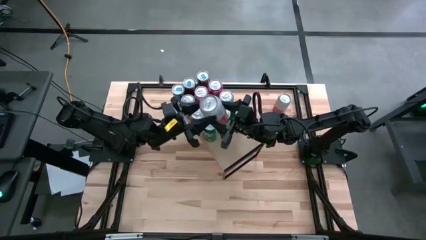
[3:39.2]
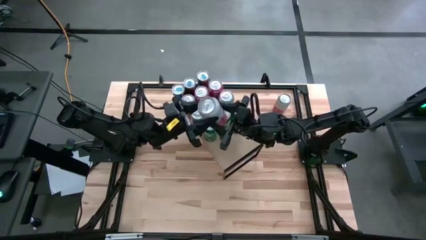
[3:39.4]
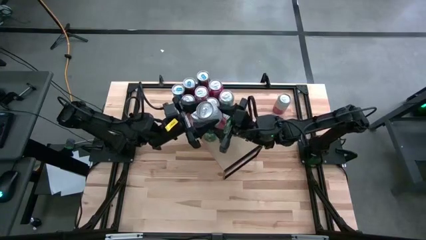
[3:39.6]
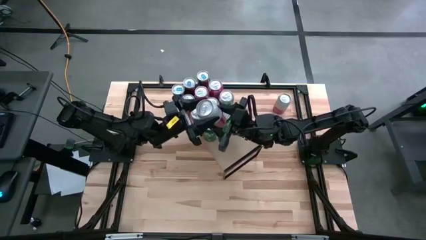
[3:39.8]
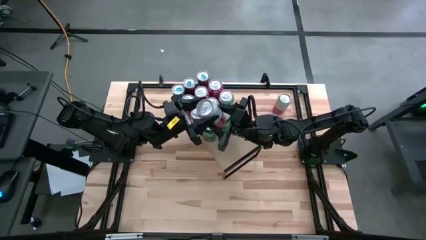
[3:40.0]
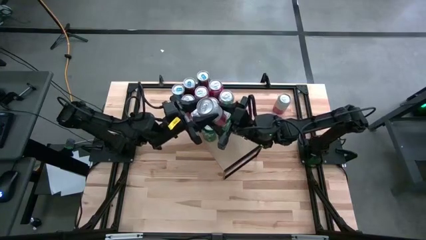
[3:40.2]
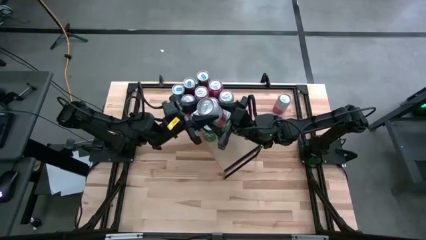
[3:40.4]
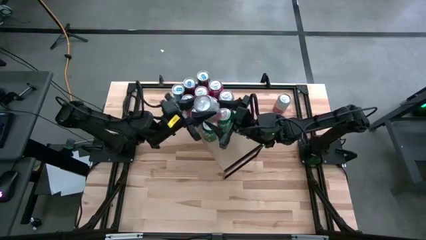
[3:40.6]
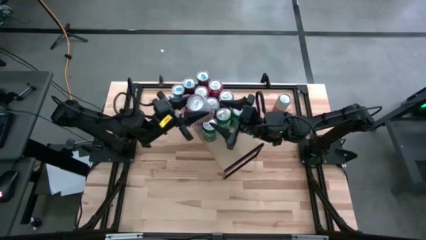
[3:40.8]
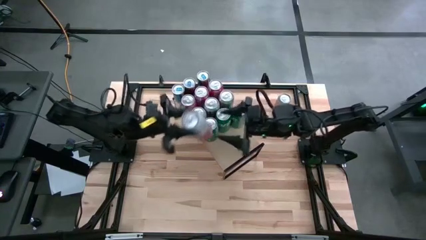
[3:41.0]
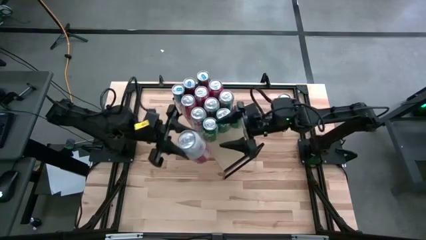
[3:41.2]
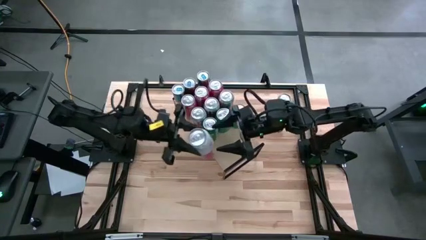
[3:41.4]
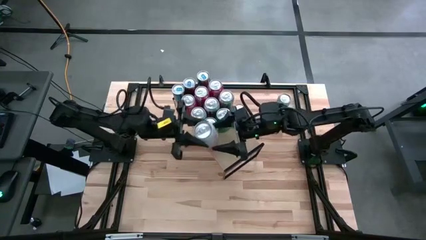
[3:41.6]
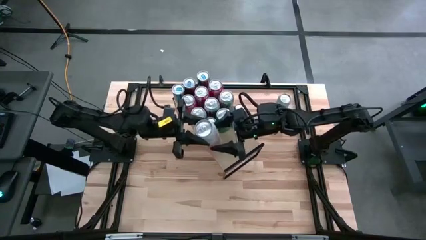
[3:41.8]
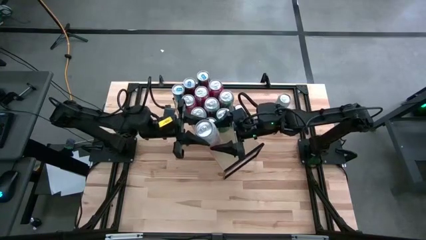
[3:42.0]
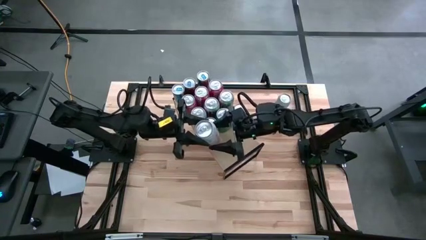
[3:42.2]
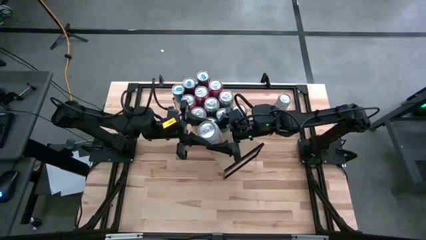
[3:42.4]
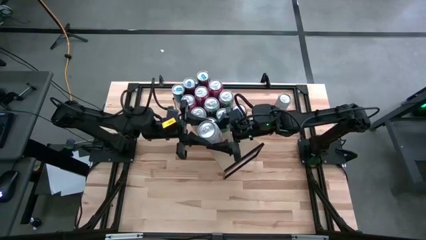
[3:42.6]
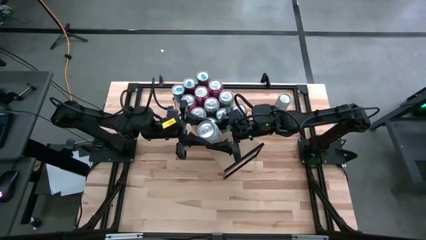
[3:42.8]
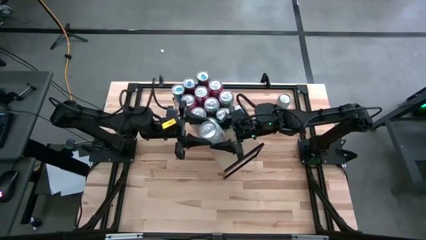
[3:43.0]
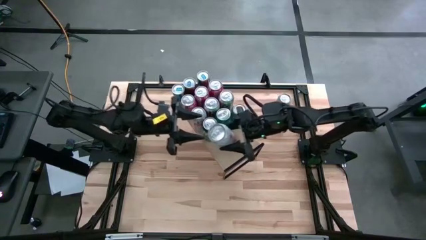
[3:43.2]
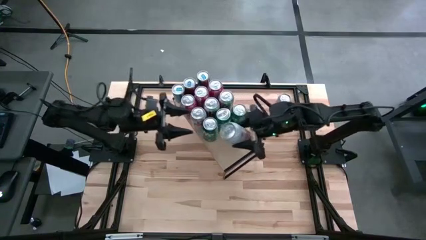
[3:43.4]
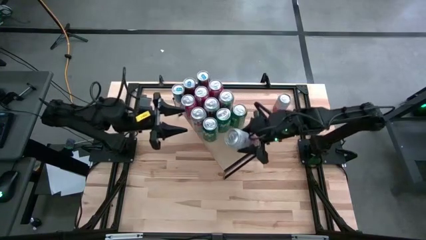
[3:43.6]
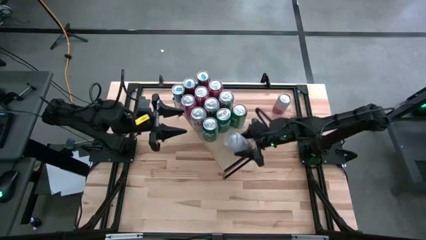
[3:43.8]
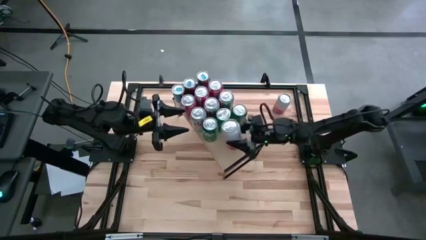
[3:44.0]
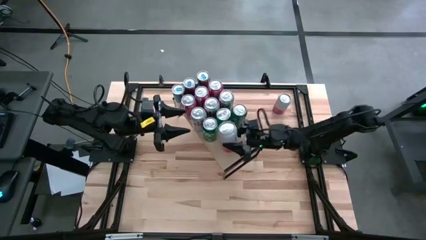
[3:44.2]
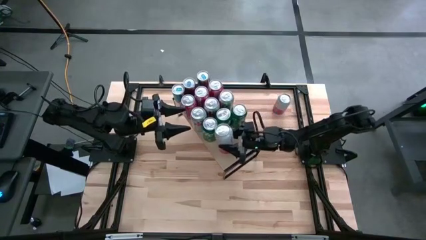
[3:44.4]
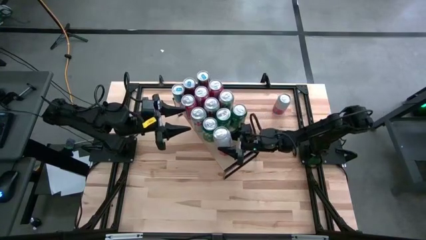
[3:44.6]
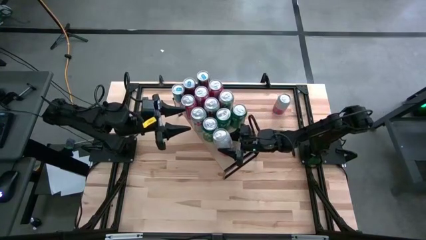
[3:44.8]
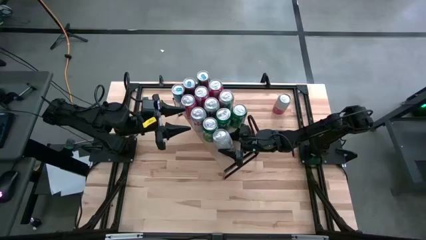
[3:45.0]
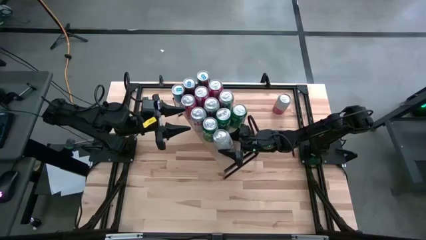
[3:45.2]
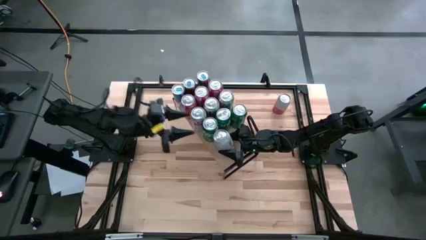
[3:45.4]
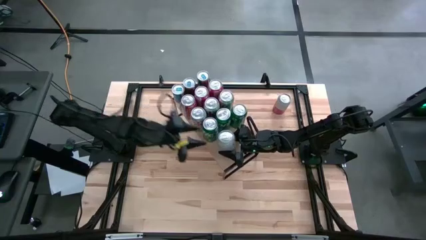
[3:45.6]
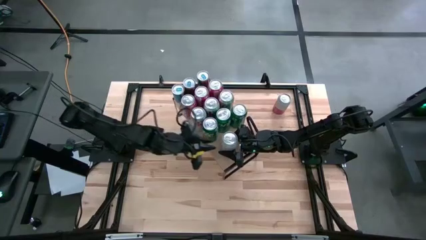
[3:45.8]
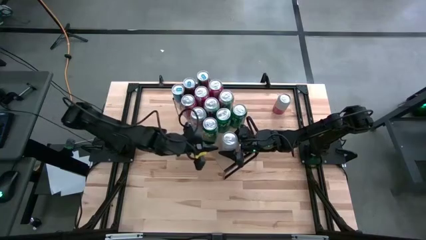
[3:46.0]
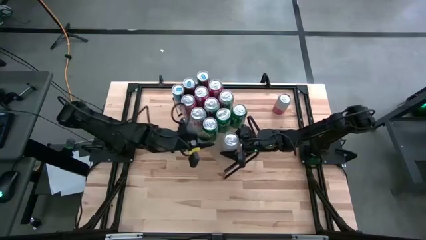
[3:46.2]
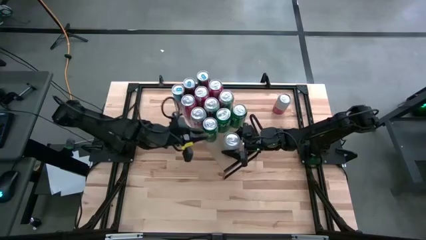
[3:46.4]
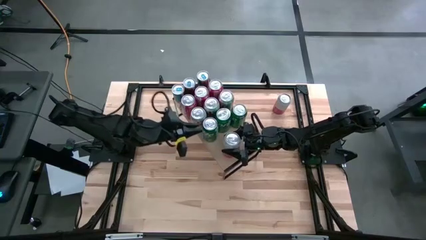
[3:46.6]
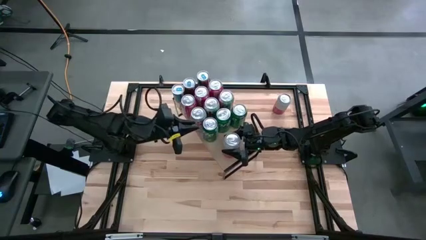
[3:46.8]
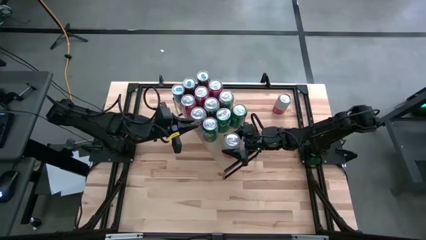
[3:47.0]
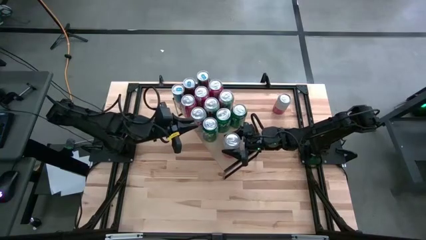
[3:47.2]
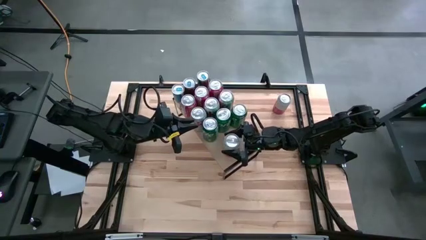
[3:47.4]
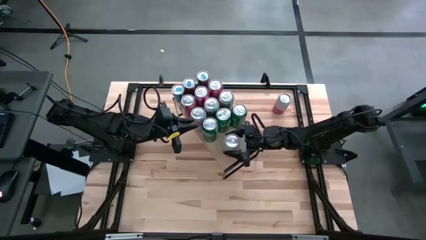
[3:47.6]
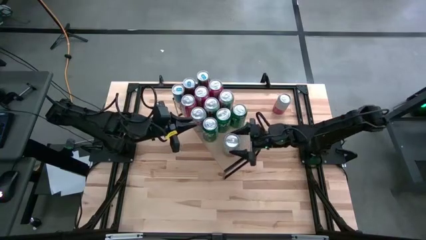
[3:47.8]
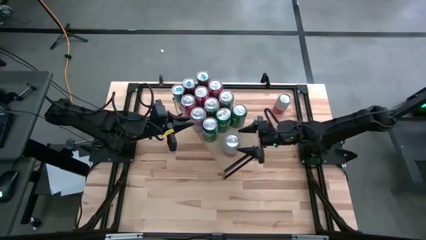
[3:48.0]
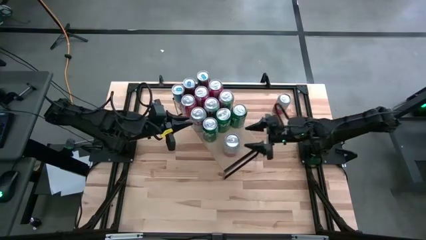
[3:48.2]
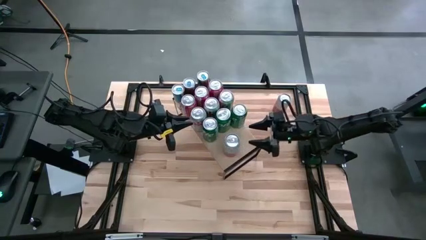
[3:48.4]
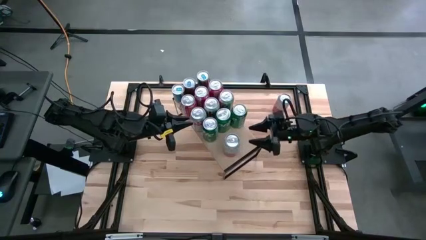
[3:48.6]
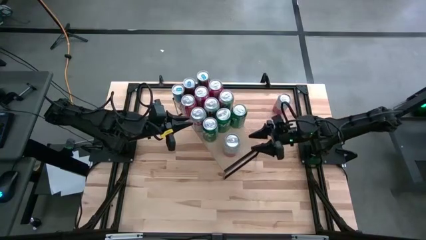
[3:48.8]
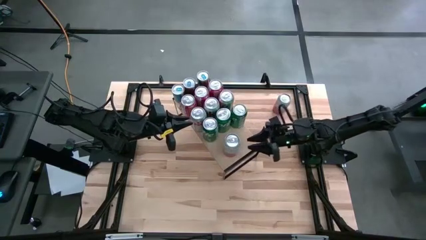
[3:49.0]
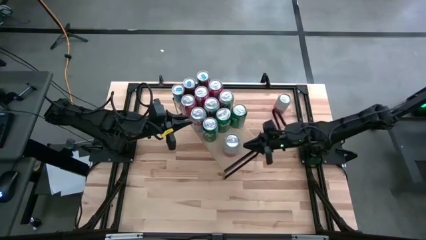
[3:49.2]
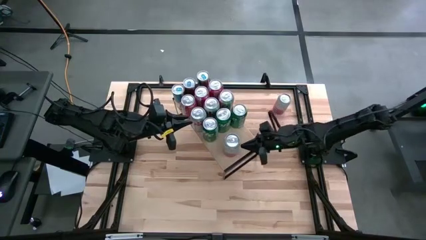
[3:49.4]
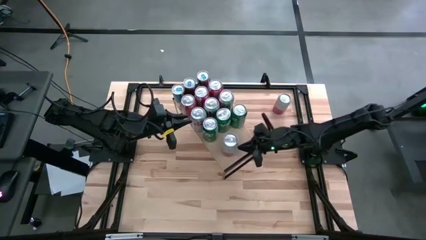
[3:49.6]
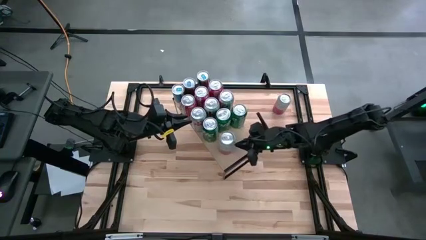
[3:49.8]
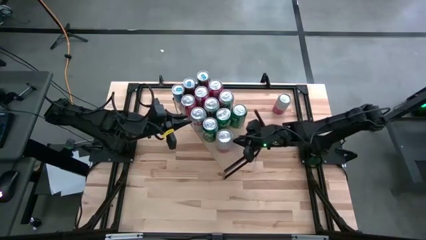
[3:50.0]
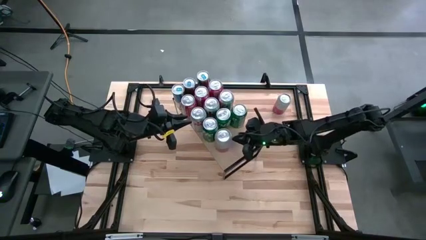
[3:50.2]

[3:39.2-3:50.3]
Task: Place canned beverage on shelf
Put the bottom pink soda can on the shelf

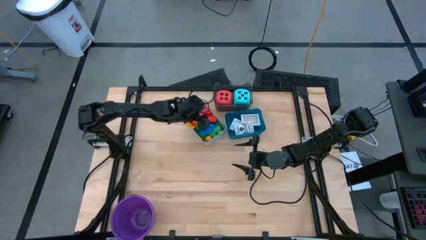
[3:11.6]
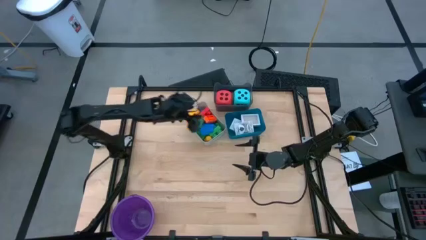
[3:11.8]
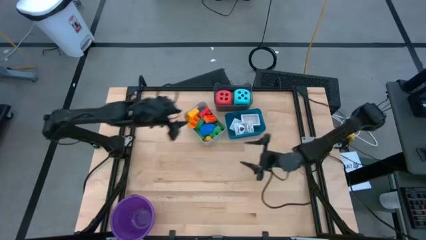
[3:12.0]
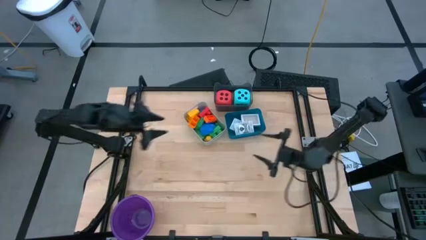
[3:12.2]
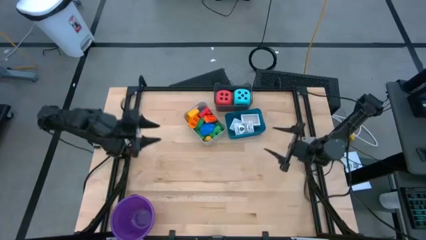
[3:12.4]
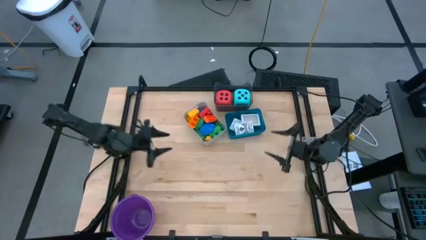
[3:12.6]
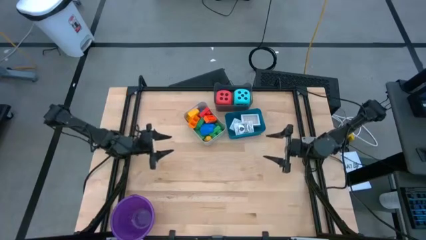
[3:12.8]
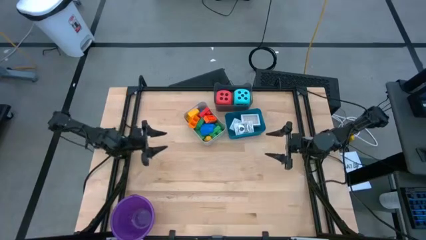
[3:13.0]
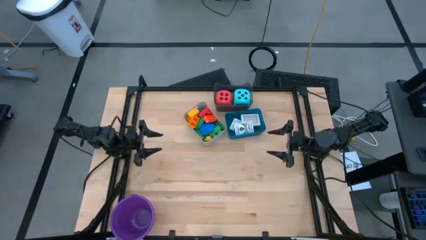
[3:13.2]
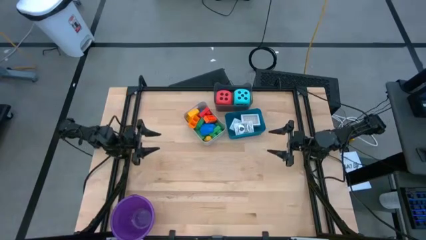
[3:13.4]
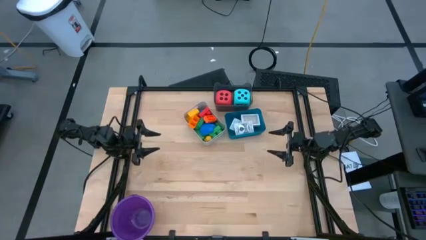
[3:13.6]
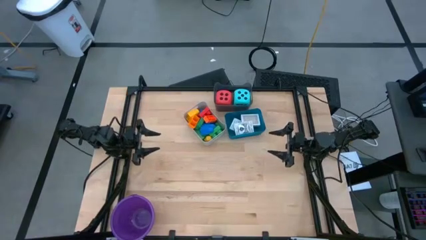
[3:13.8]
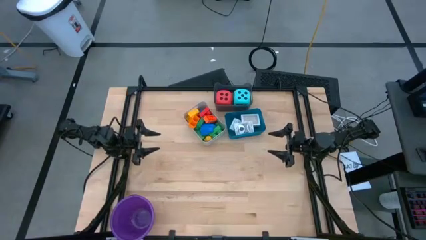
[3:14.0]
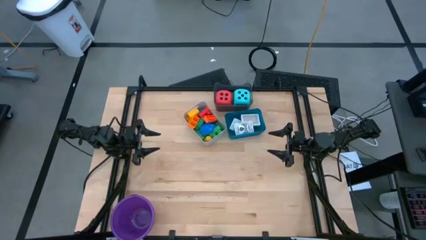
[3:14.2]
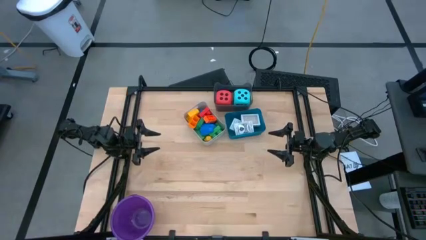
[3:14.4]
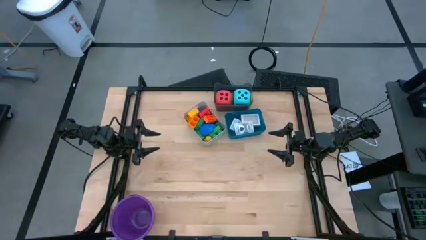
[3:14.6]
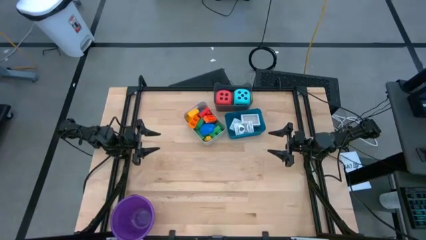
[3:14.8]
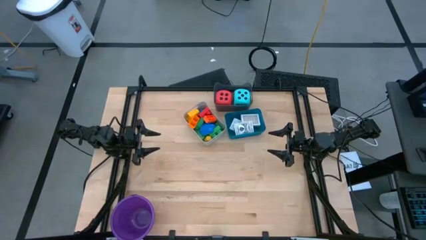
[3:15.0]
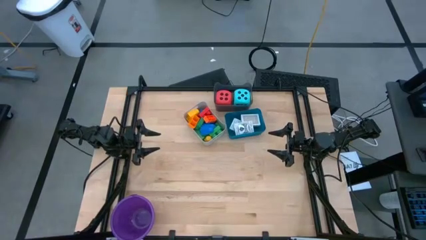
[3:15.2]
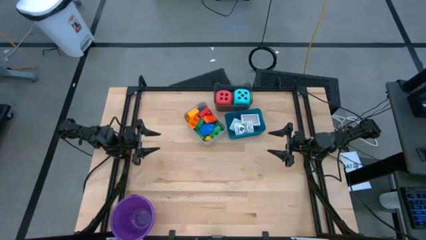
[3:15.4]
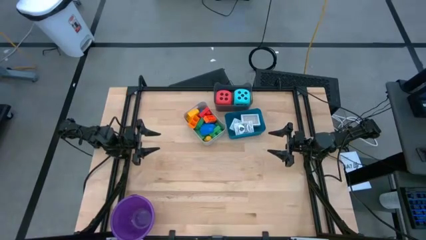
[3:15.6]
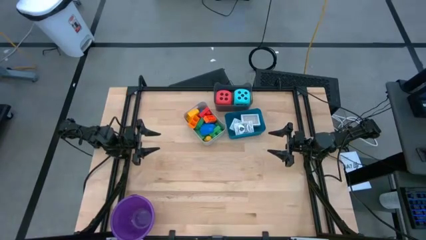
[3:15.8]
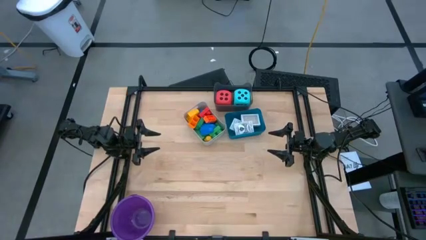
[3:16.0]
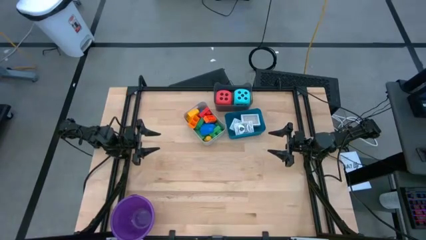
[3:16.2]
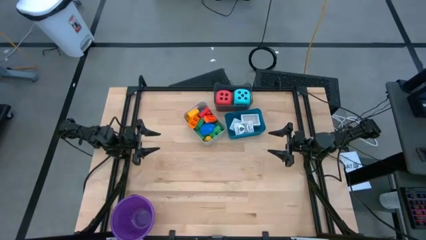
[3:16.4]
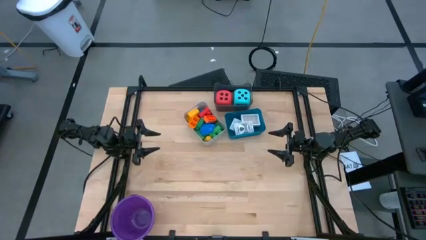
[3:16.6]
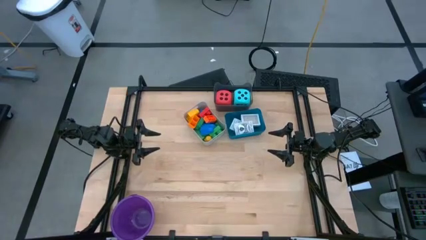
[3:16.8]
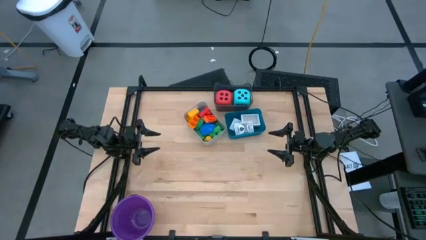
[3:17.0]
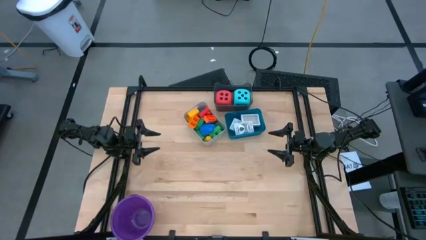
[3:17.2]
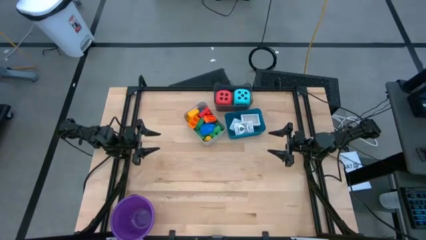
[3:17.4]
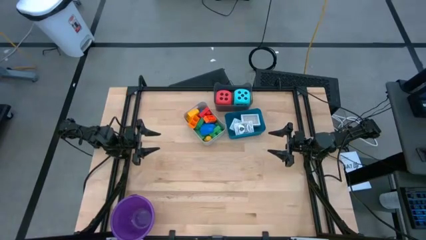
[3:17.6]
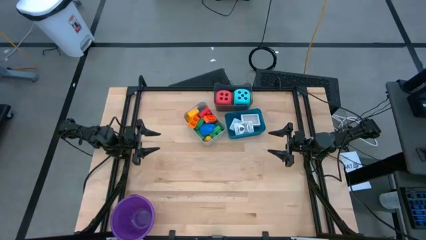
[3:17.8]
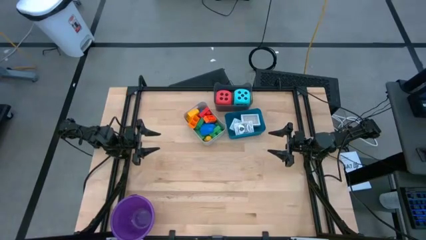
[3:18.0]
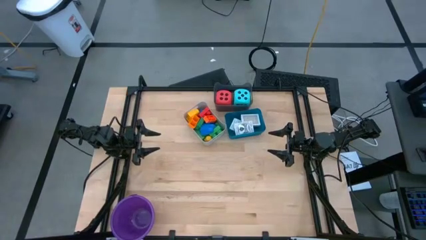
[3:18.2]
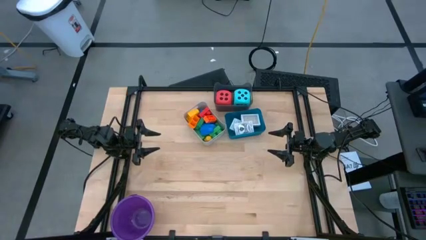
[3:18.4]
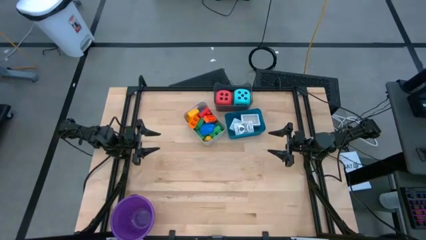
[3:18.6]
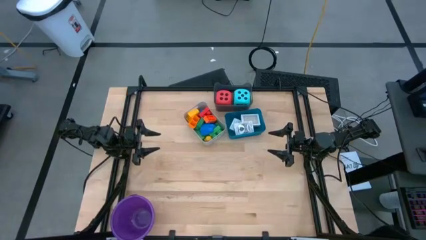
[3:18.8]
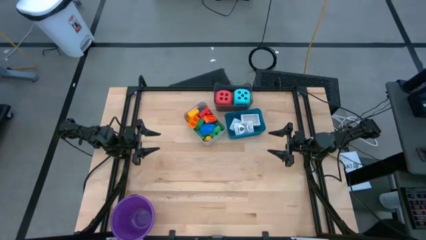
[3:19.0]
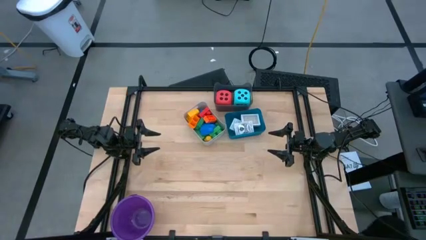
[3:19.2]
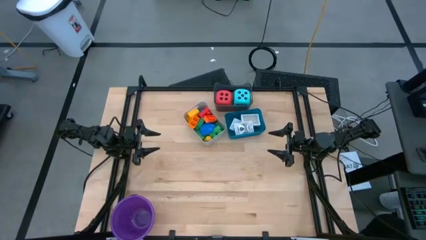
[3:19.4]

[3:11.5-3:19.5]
Task: Pick & Place Toys
Return to Home Position
